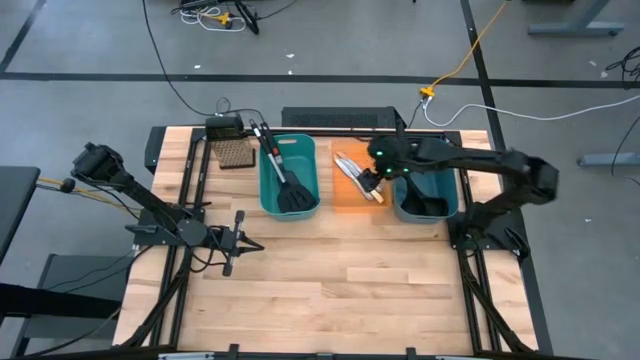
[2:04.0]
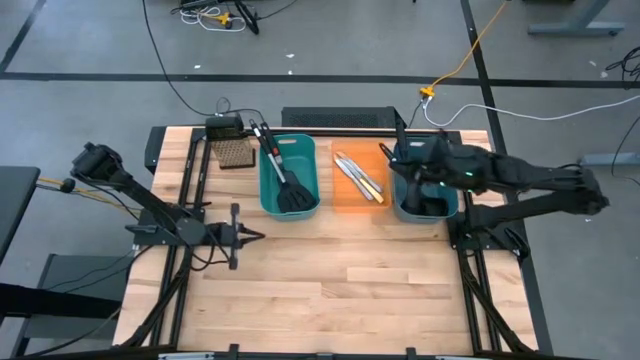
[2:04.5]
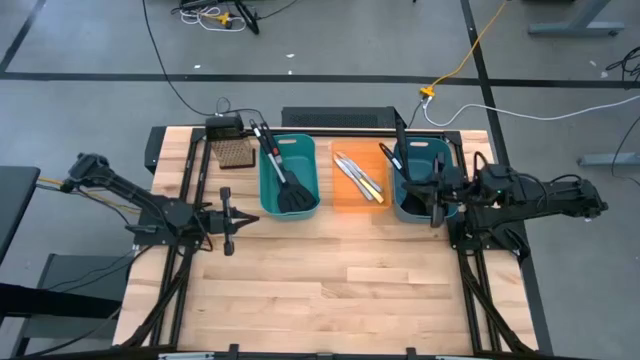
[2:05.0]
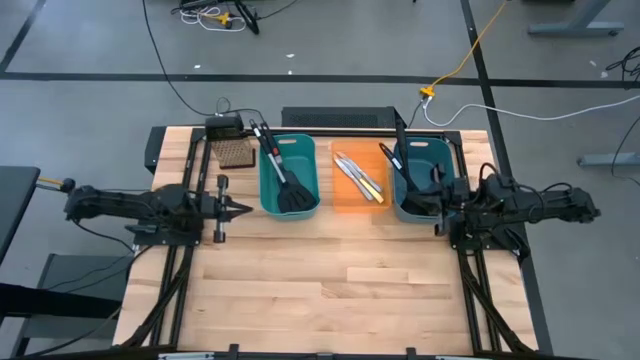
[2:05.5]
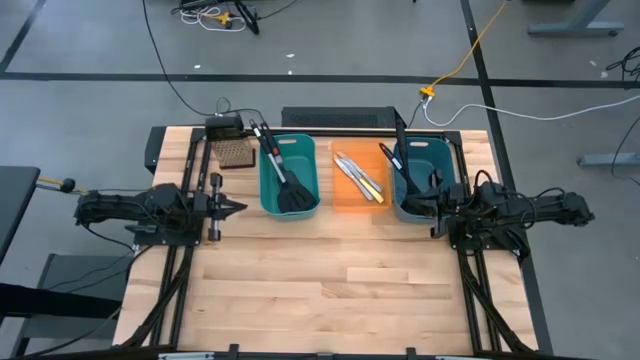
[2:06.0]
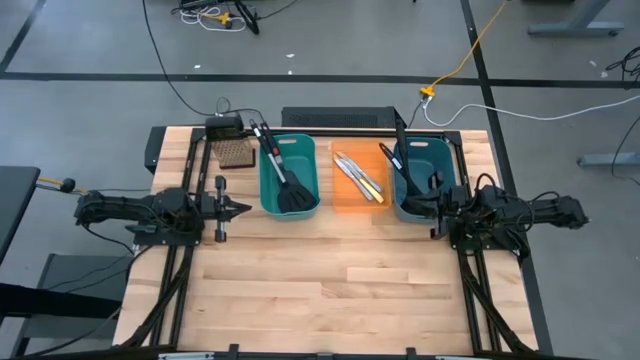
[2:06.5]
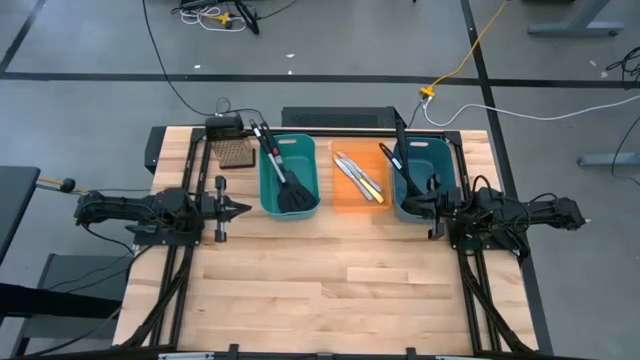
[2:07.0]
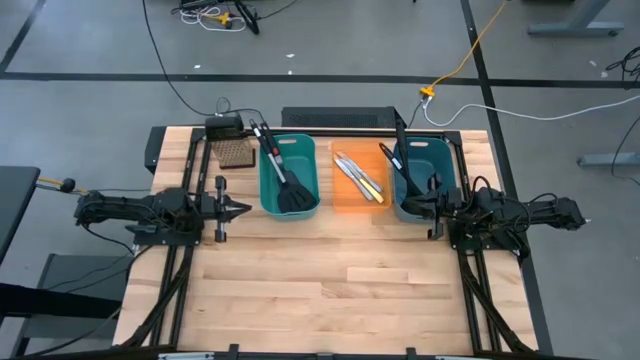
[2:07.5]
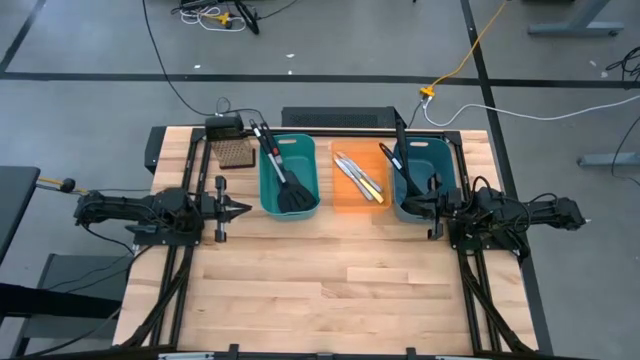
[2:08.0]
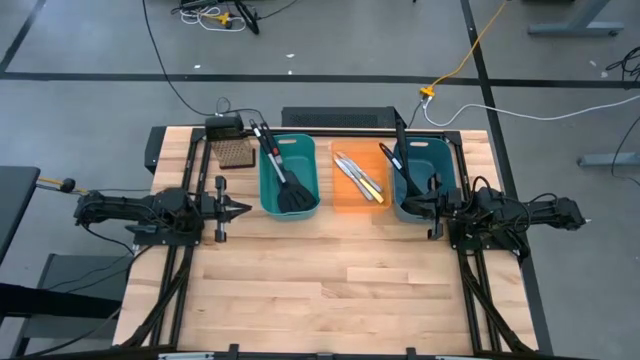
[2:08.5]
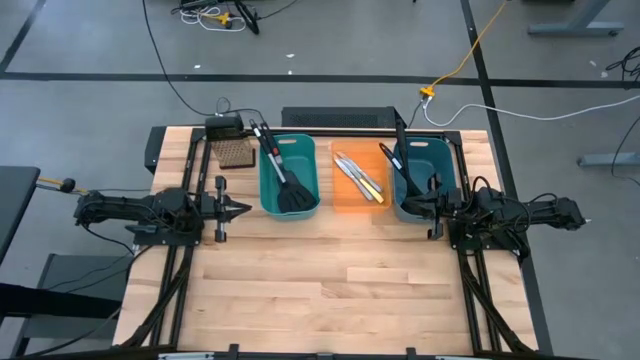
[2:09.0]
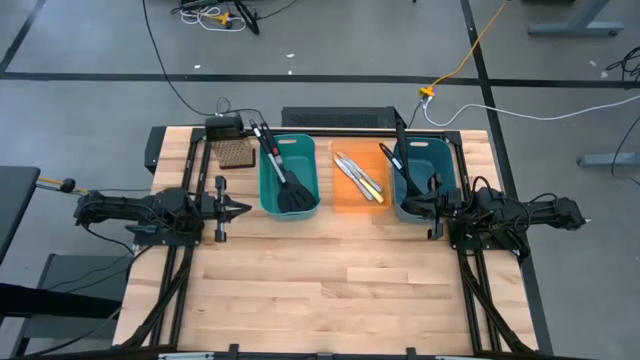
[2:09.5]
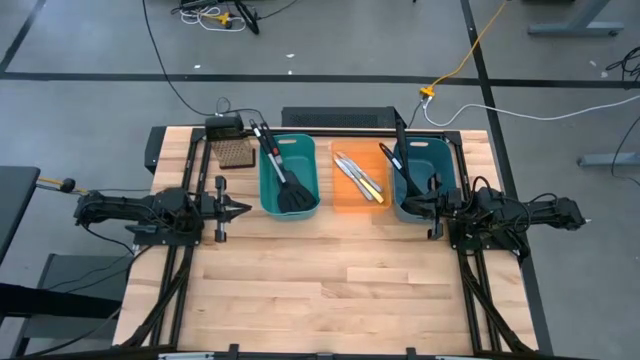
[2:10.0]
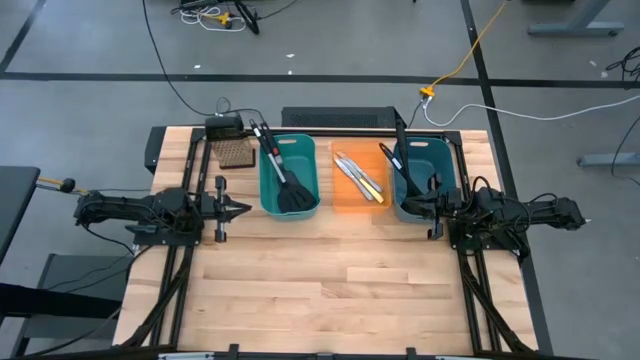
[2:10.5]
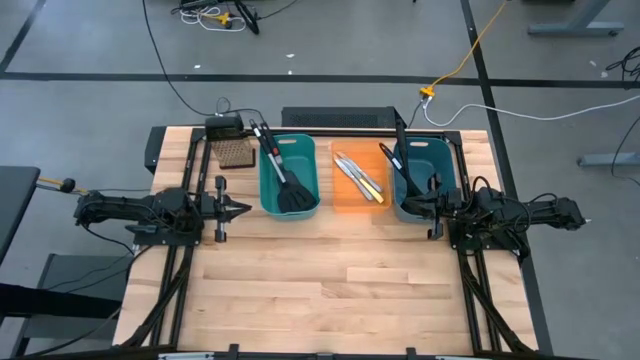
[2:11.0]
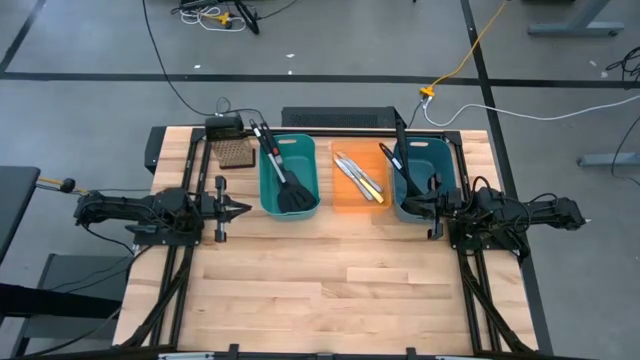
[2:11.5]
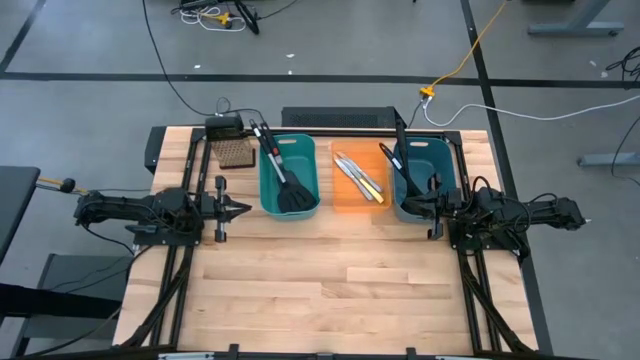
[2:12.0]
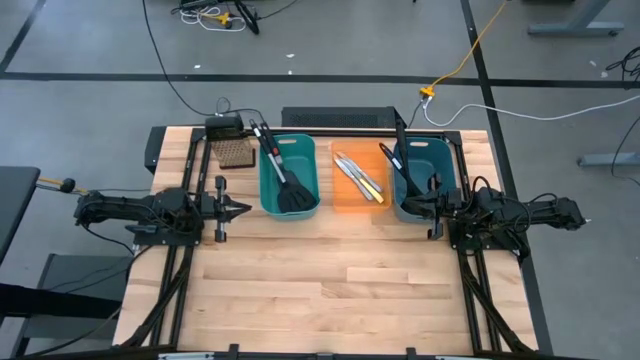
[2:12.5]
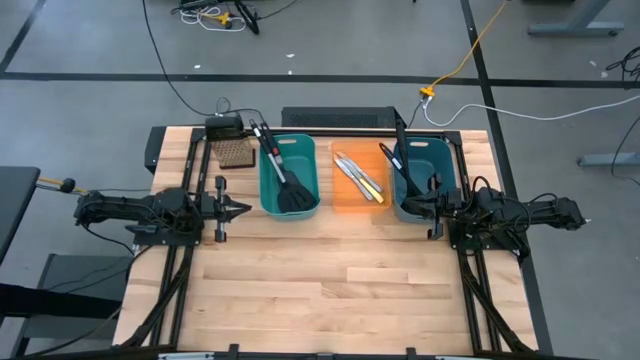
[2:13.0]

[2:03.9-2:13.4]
Task: Pick & Place Kitchen Items
Return to Home Position

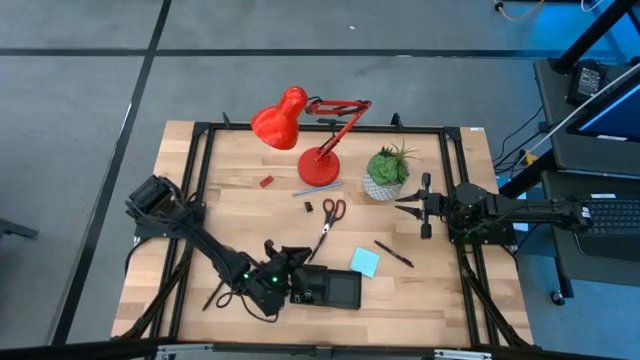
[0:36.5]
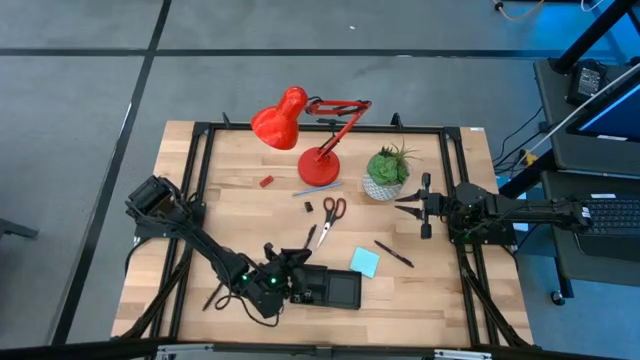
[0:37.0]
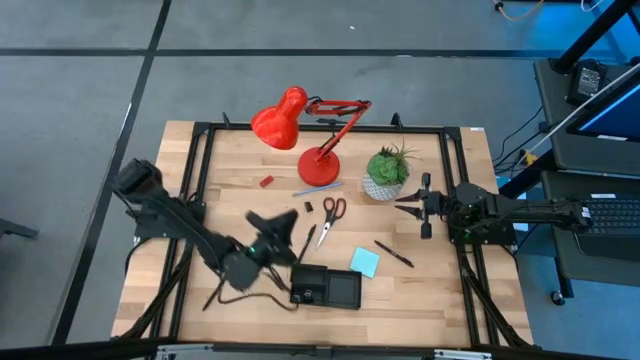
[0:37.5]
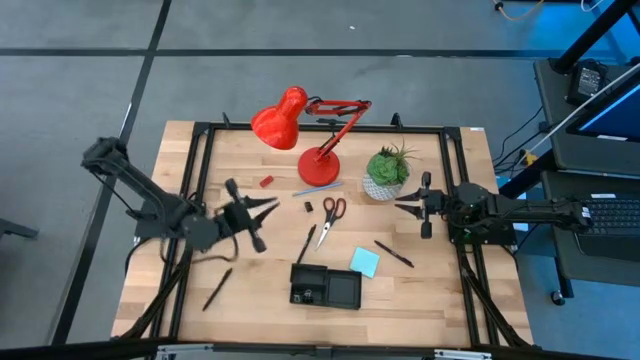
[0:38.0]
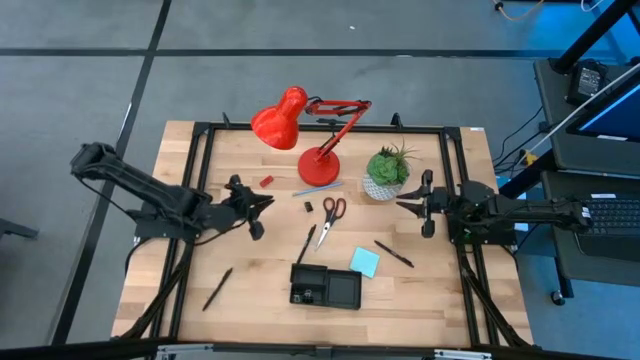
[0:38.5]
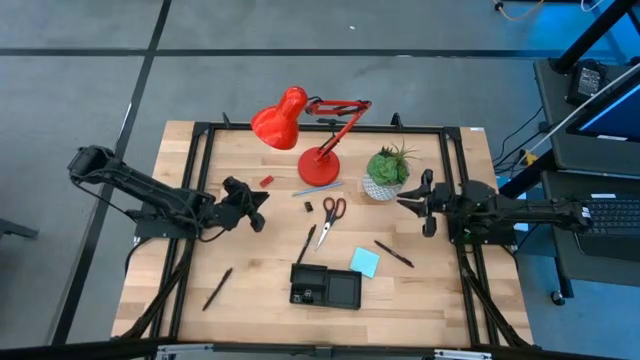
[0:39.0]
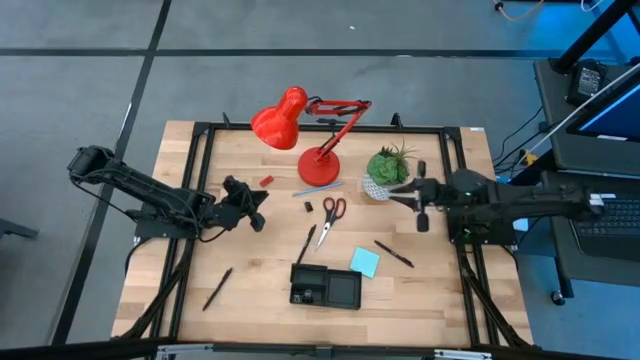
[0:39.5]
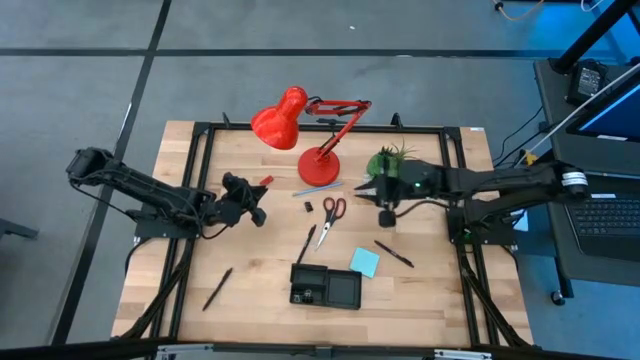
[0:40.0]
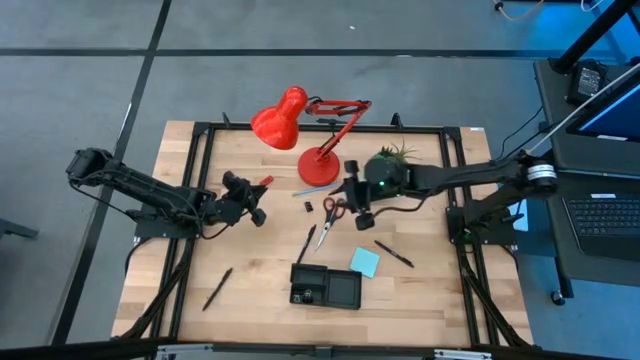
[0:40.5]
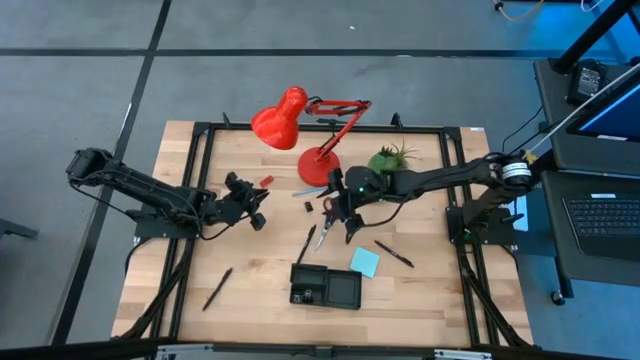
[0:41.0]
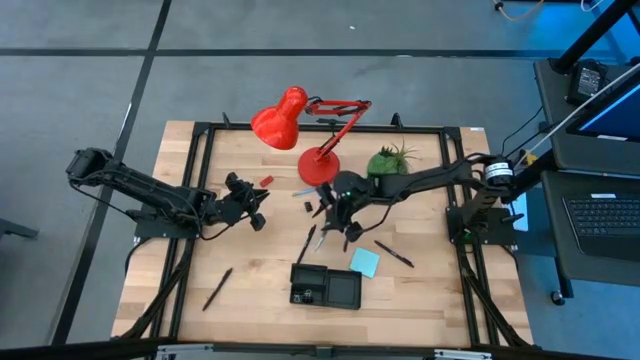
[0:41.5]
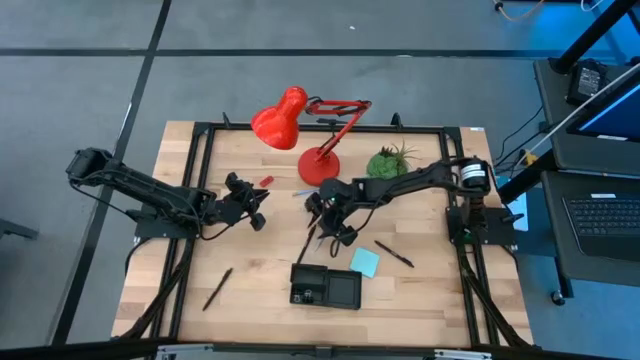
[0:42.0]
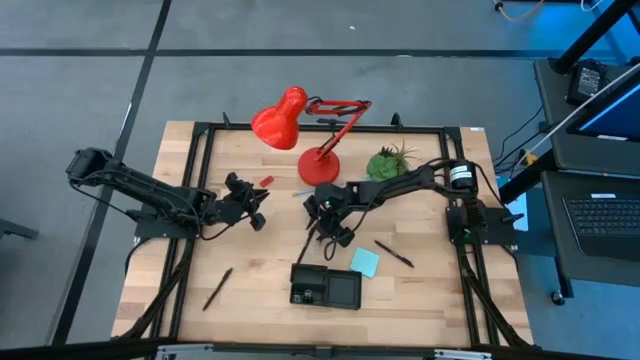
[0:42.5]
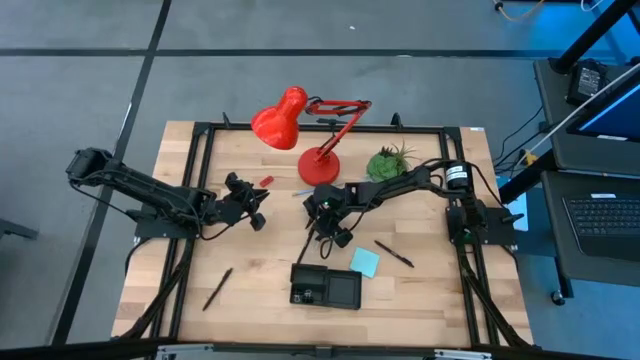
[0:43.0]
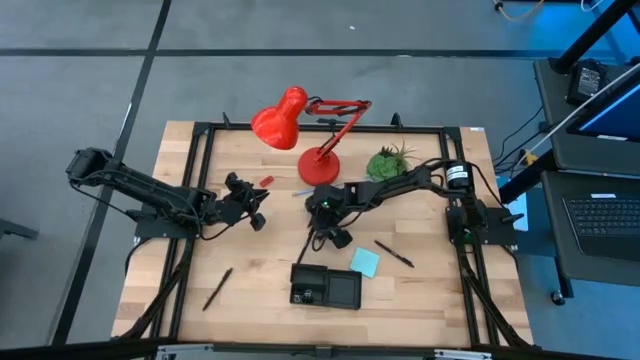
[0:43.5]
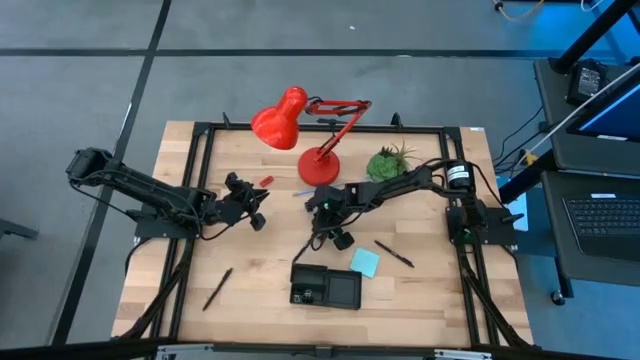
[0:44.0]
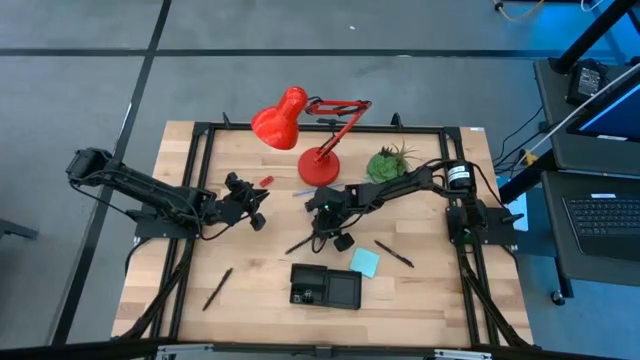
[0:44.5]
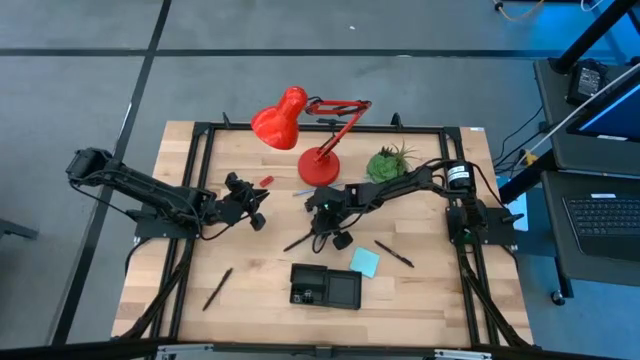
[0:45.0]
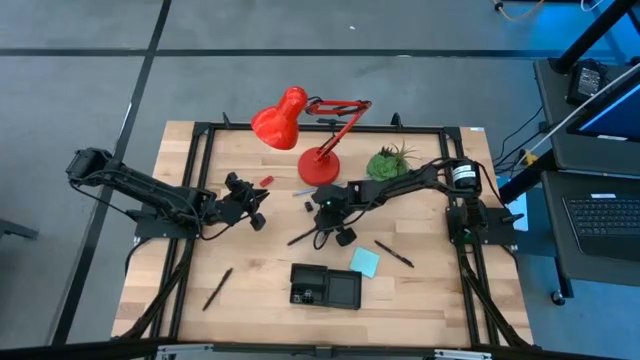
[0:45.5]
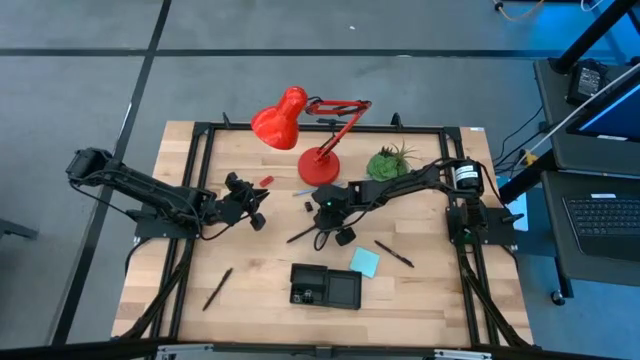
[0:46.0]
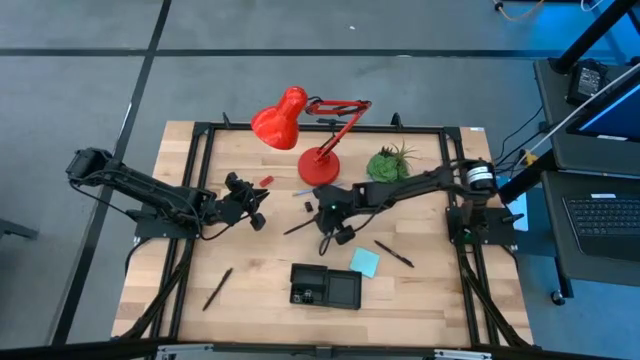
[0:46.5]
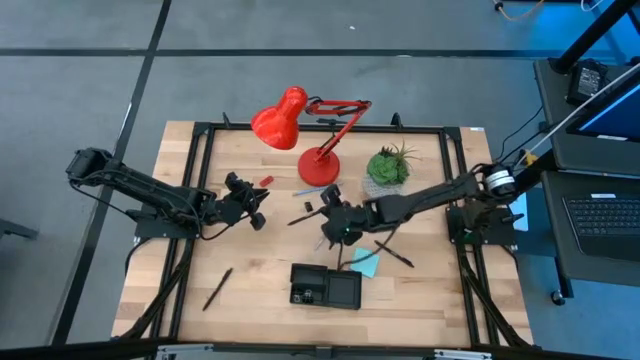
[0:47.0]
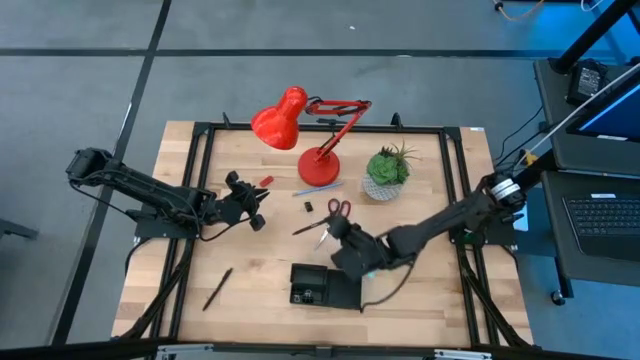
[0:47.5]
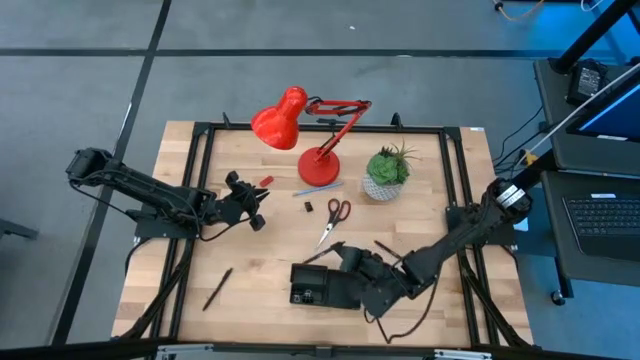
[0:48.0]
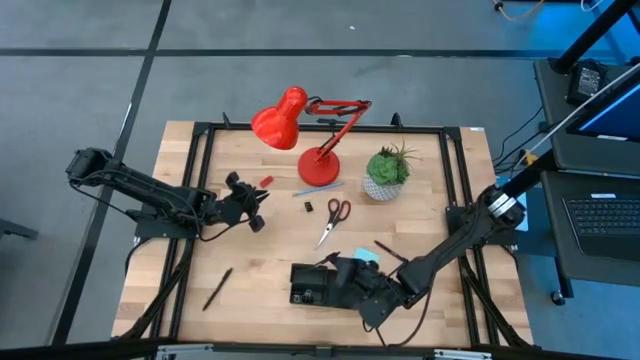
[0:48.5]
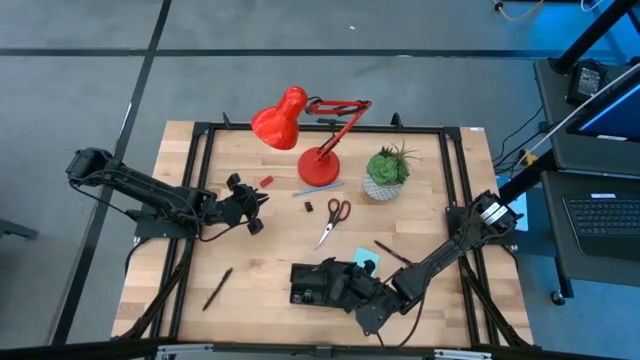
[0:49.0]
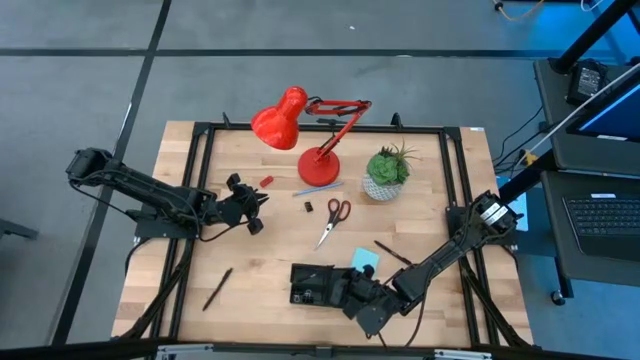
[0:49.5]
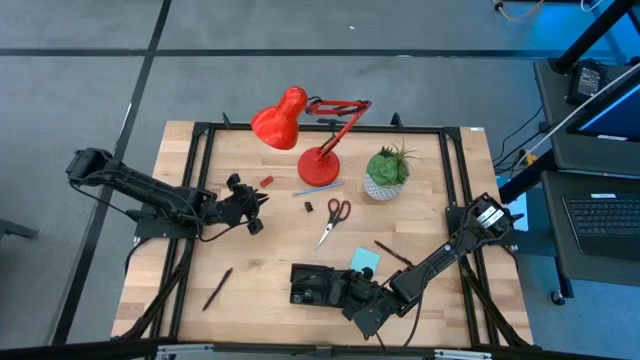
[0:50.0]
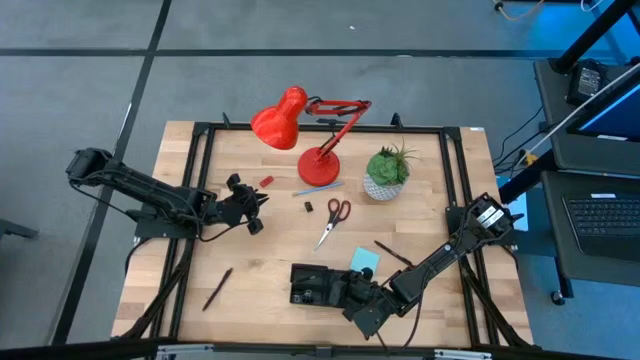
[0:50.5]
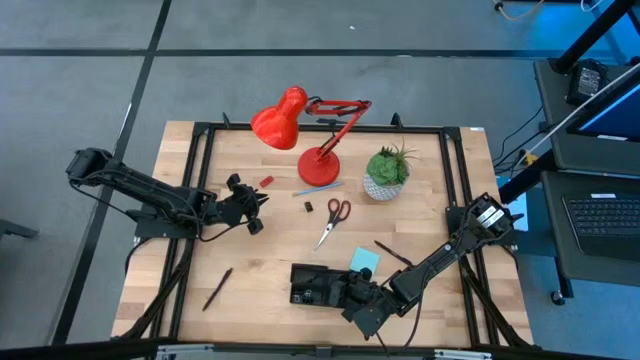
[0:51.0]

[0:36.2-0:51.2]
Task: Pick and place office supplies into organizer
Put the top left black pen into the black desk organizer
